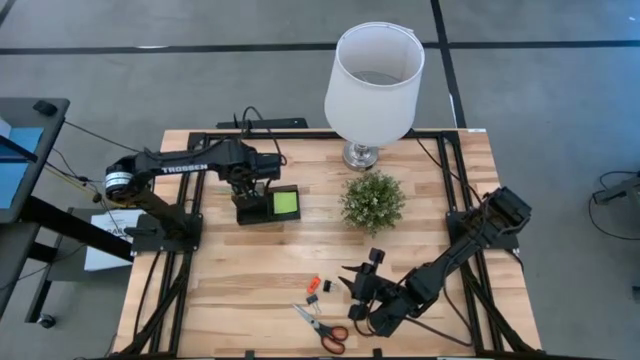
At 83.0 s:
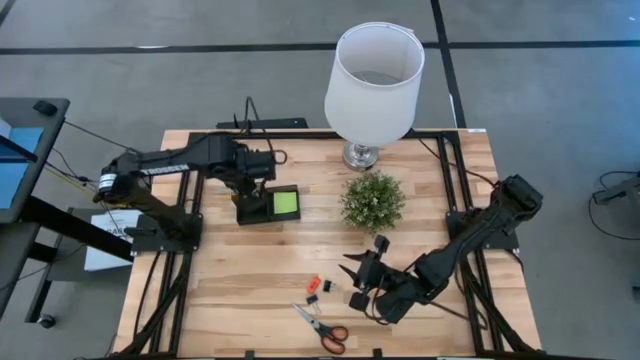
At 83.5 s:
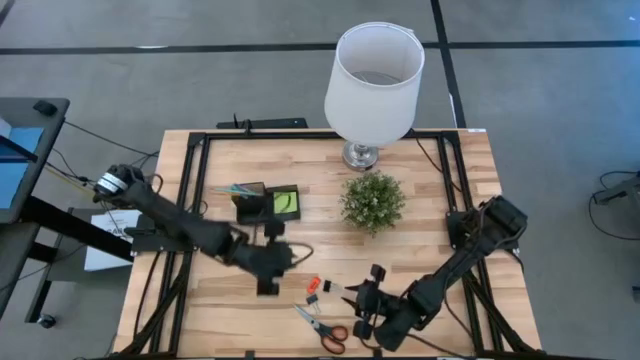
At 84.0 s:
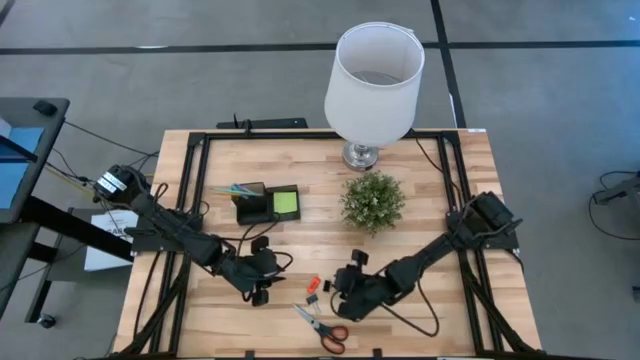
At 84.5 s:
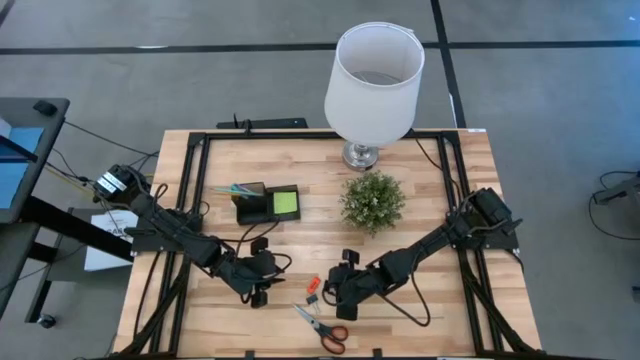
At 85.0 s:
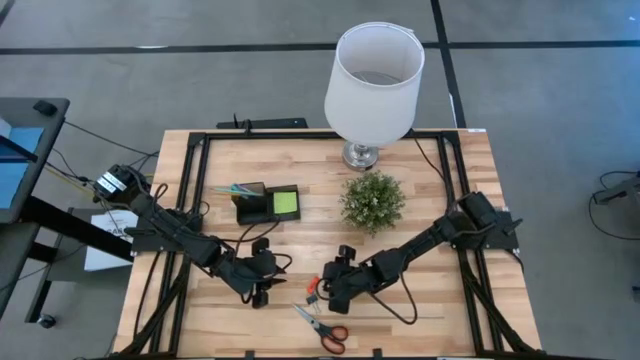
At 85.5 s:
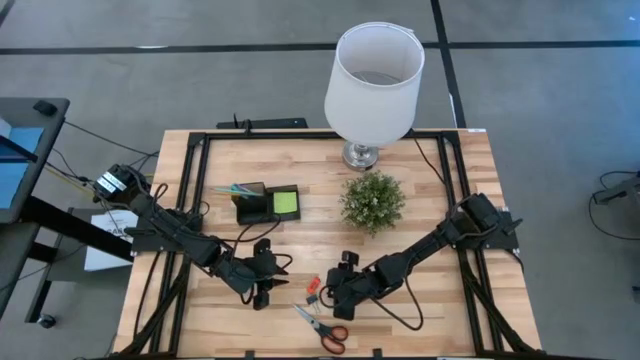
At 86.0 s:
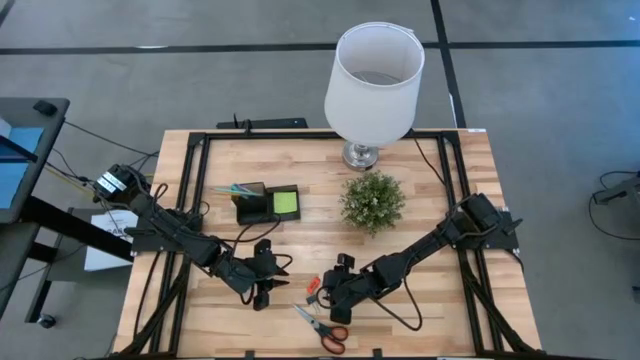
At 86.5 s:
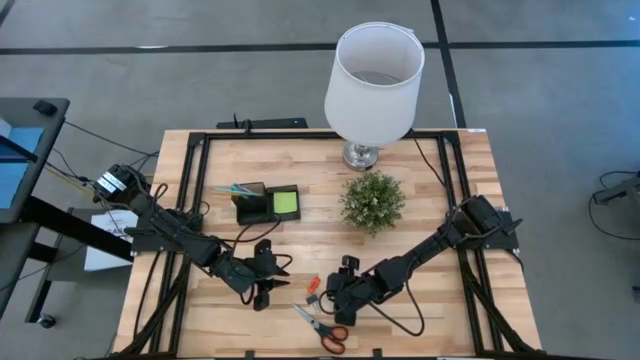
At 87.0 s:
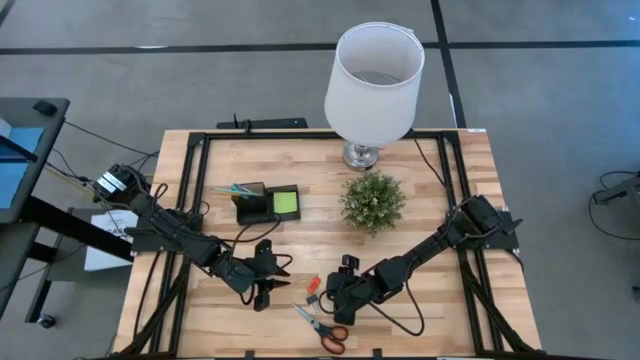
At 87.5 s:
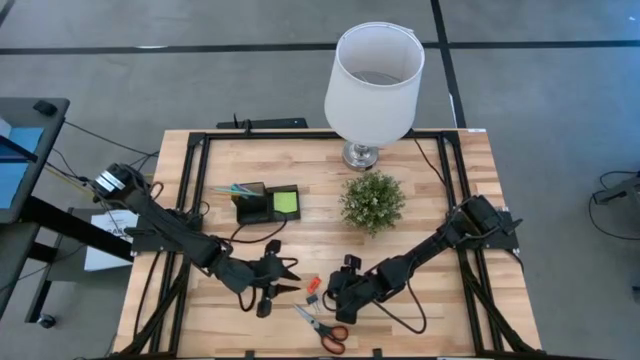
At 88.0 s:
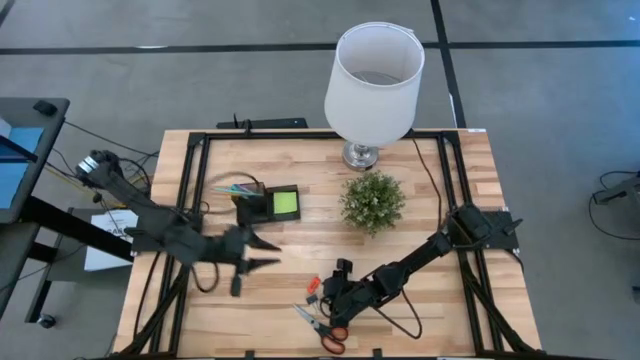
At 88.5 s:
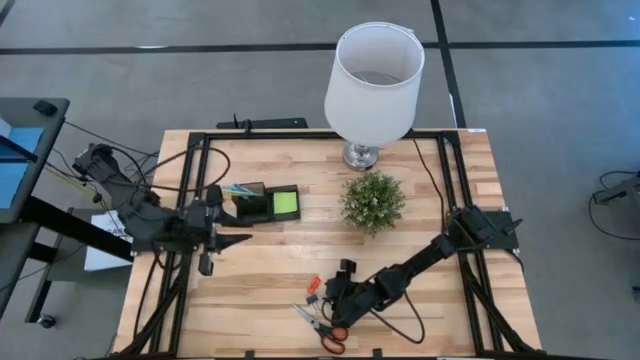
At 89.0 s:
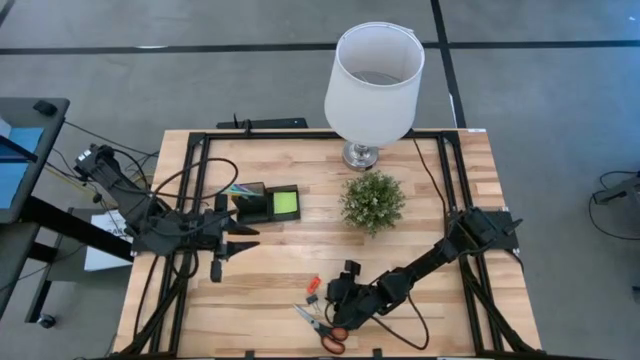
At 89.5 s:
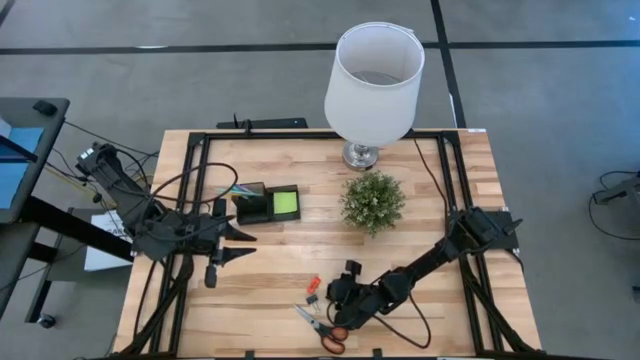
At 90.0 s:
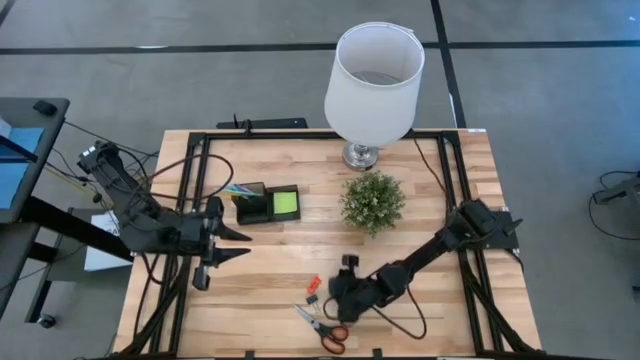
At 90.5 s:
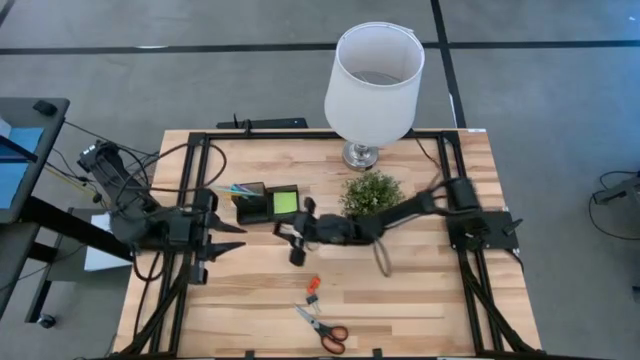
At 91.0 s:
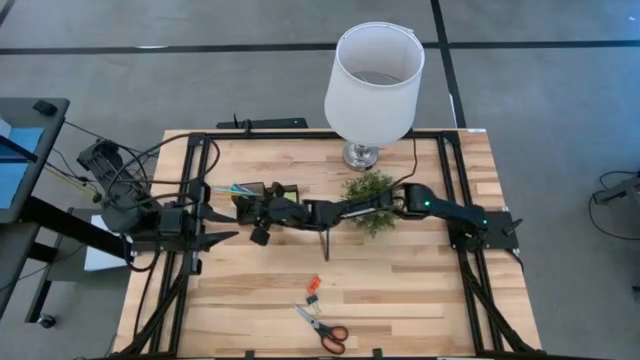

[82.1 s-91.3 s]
Task: Pick and place office supplies into organizer
Put the right black binder clip into the black desk organizer

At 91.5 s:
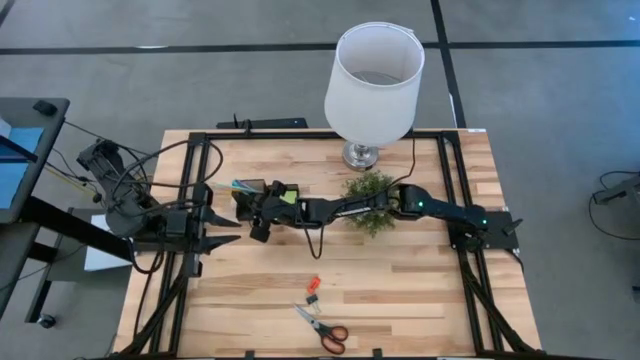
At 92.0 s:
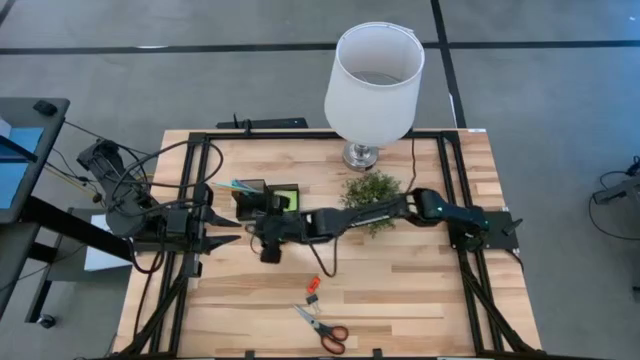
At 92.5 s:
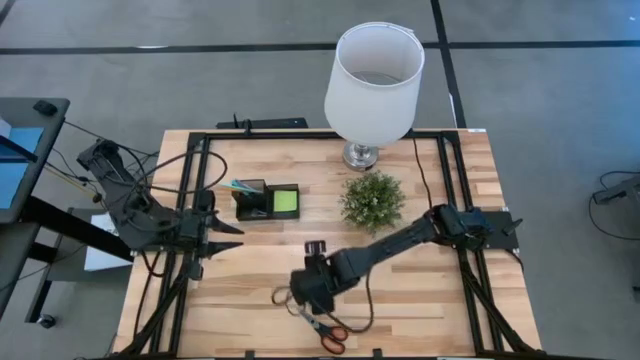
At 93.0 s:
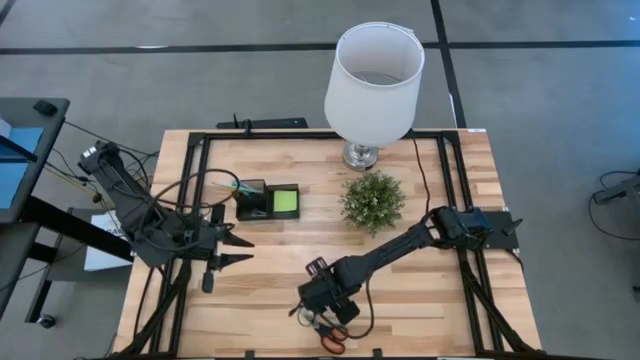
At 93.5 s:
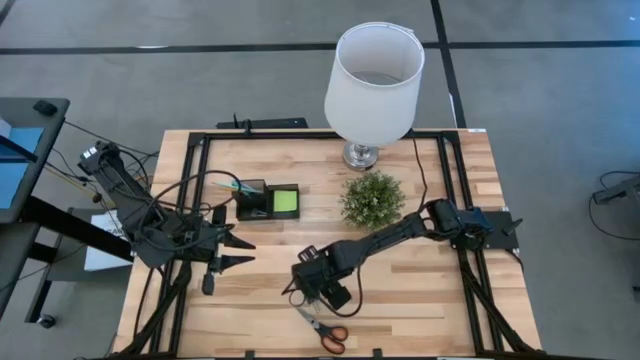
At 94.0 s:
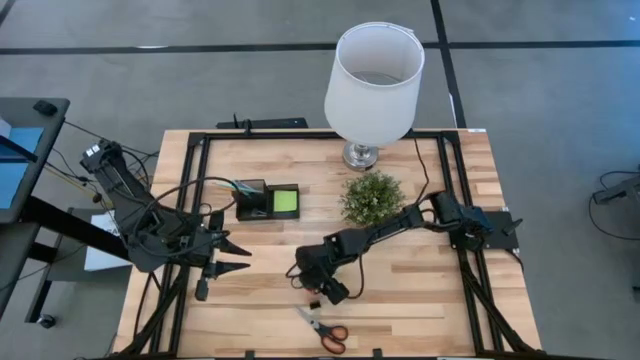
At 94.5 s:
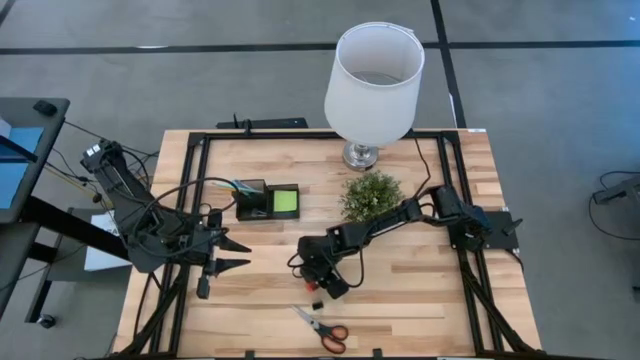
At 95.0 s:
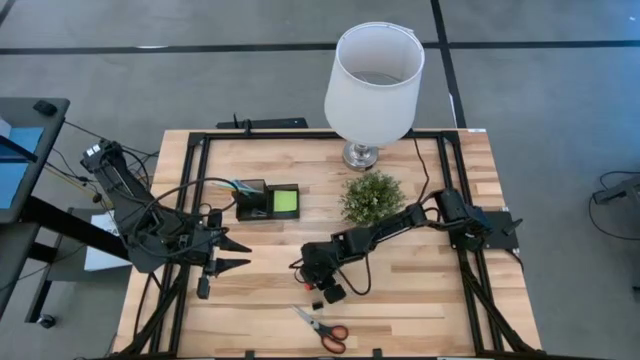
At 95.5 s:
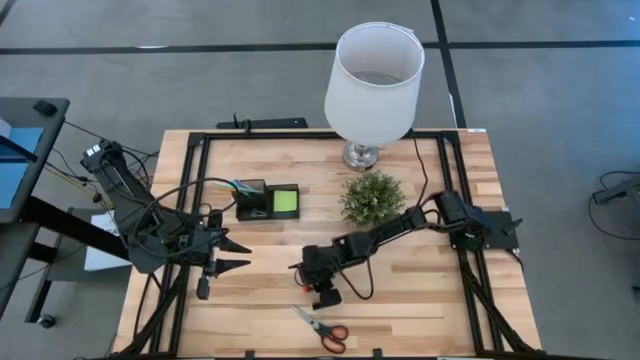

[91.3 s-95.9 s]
Put the orange eraser into the black desk organizer

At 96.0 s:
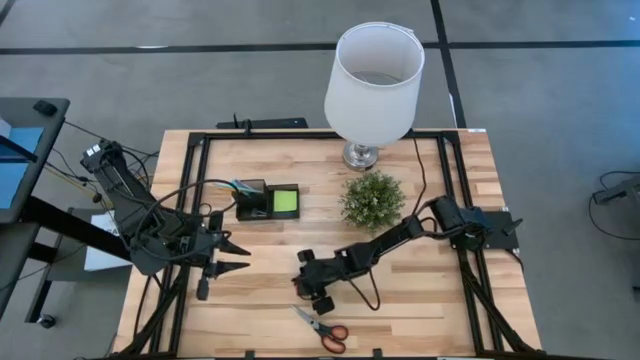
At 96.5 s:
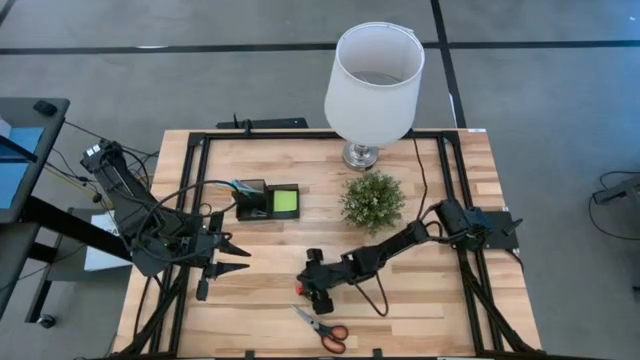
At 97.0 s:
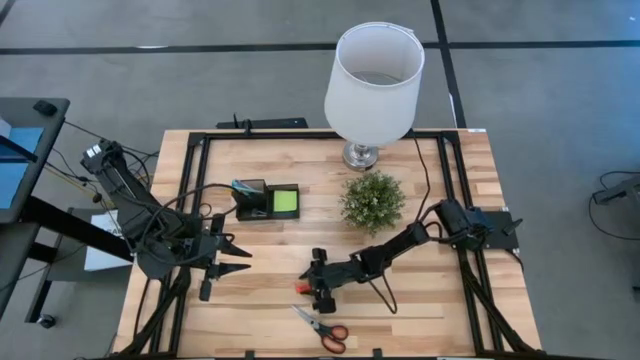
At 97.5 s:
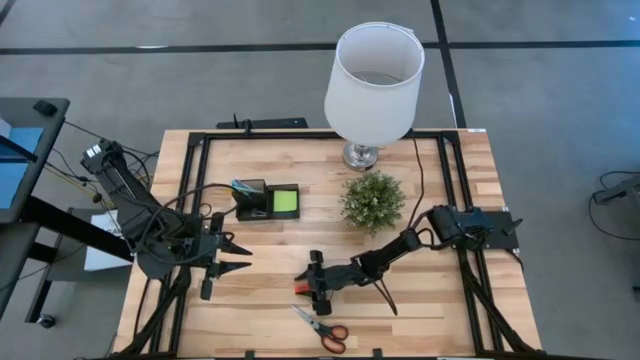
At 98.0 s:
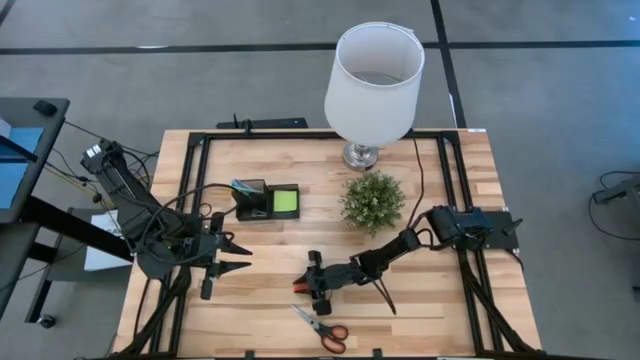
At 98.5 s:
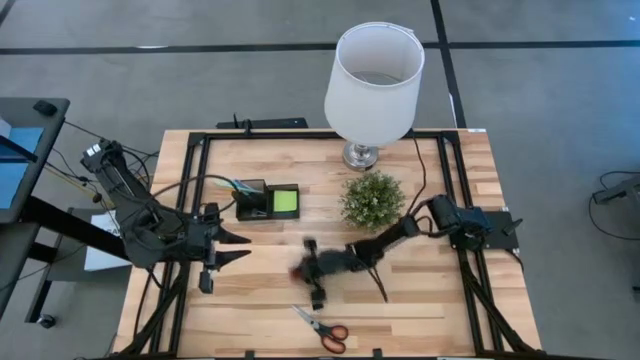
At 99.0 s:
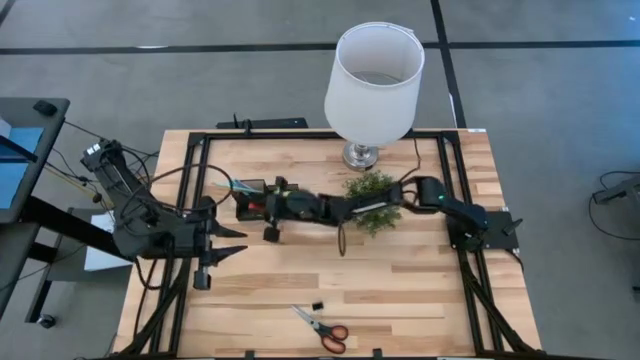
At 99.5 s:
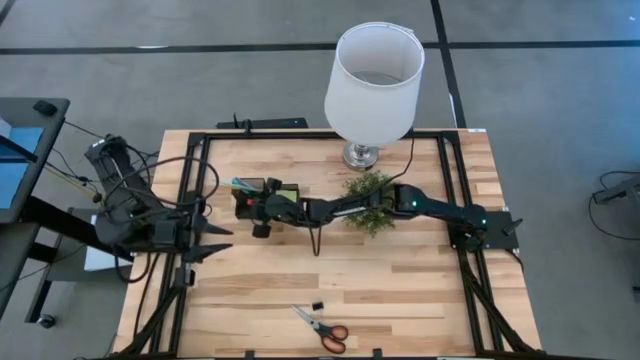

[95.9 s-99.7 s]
Put the orange eraser into the black desk organizer

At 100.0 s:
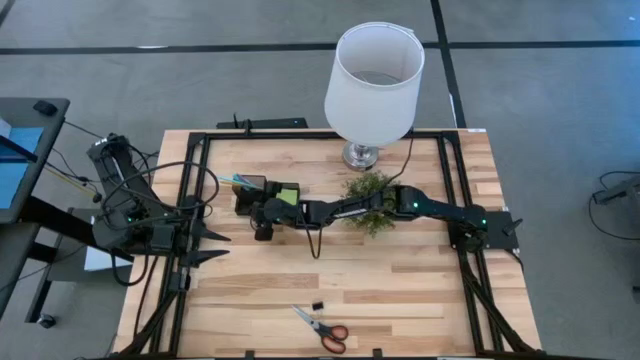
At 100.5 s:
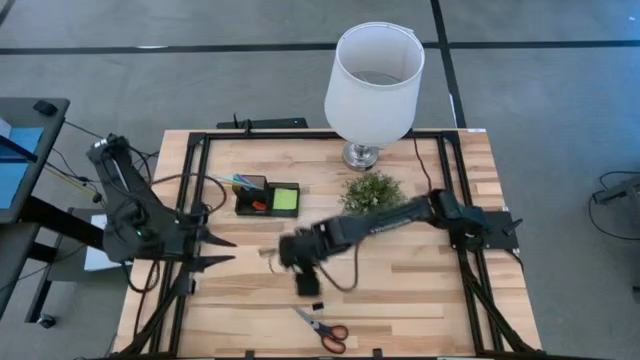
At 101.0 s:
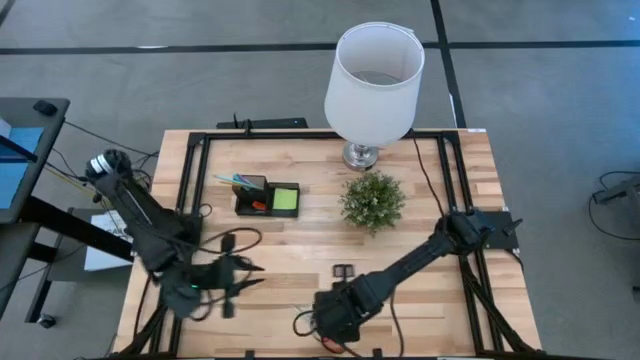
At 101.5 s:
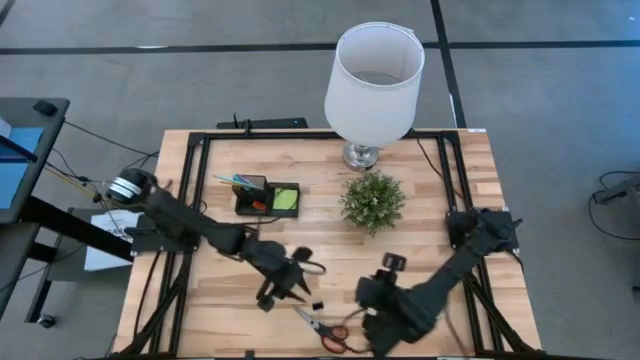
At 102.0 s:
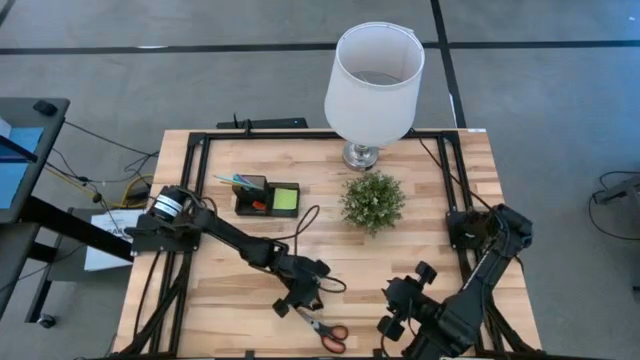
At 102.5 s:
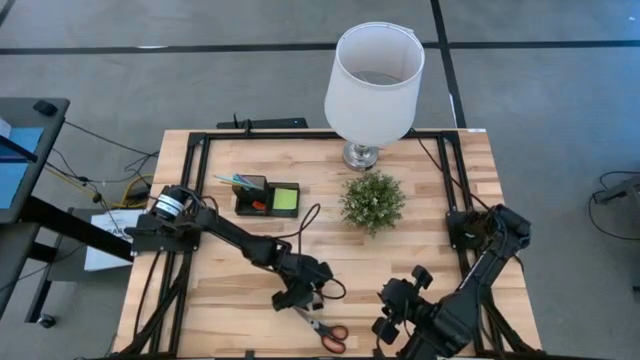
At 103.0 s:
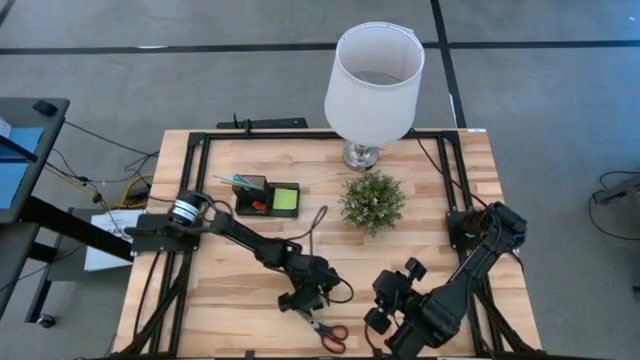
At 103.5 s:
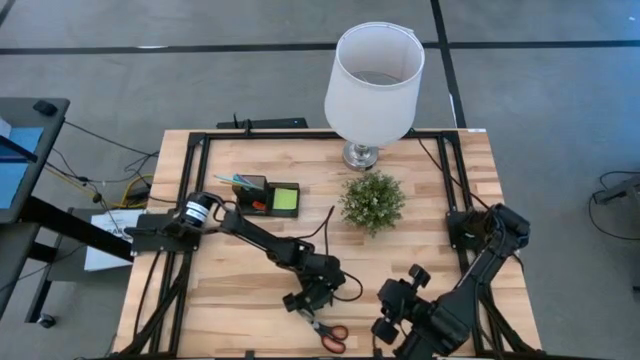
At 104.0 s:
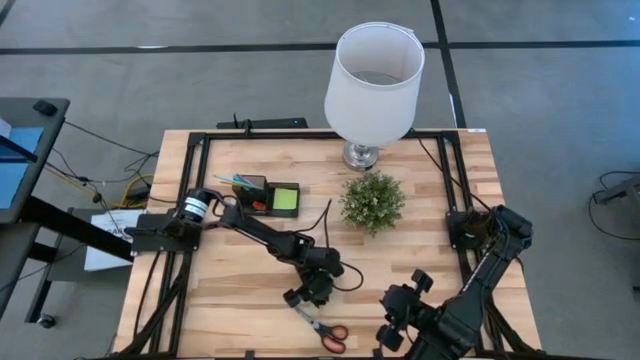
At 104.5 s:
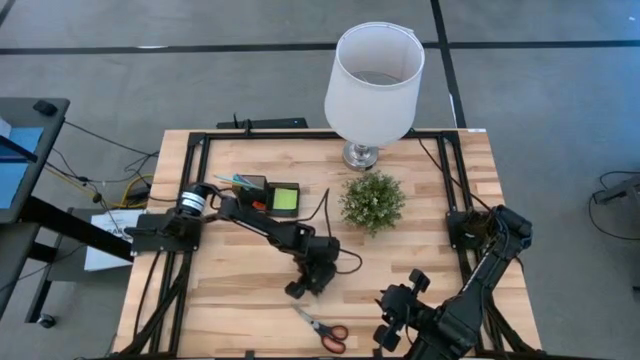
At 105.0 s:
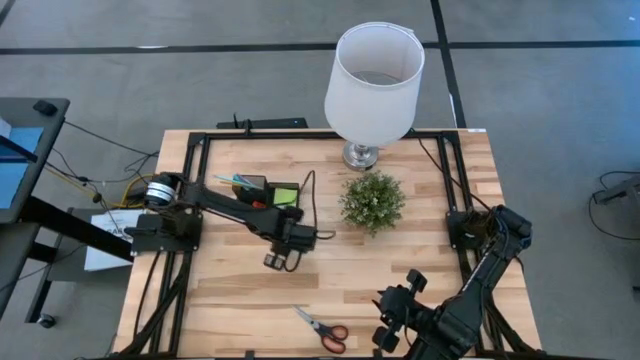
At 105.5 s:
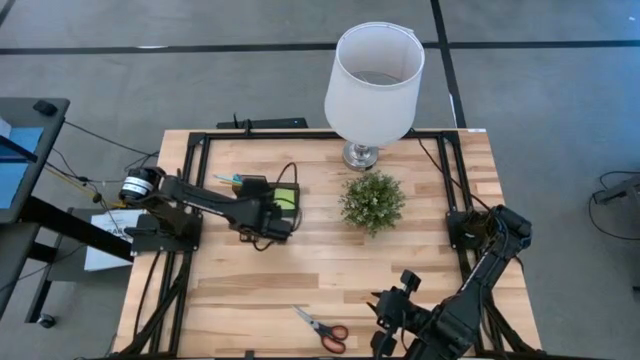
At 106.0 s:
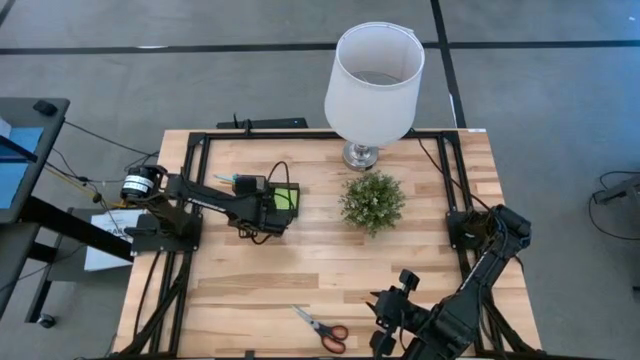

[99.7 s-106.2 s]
Put the black binder clip into the black desk organizer
